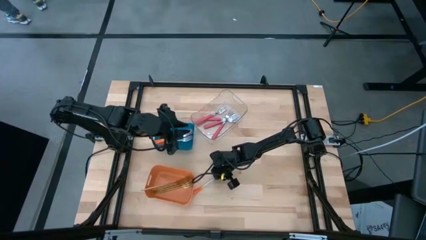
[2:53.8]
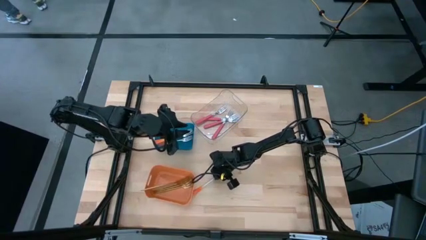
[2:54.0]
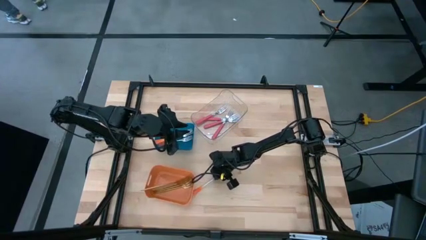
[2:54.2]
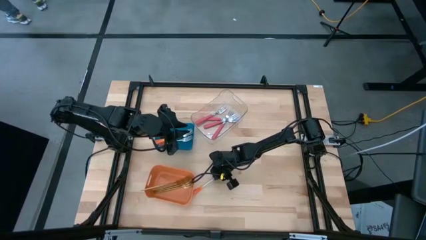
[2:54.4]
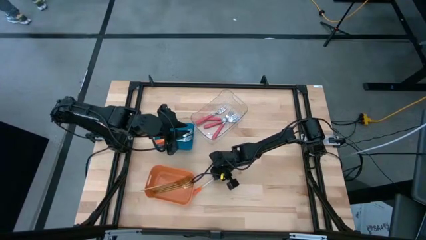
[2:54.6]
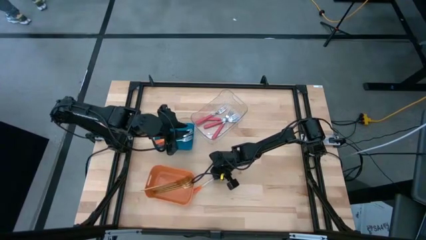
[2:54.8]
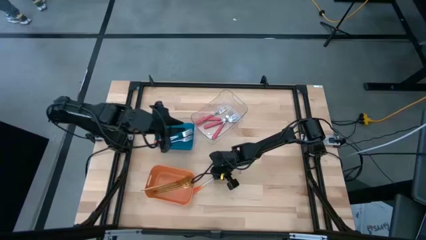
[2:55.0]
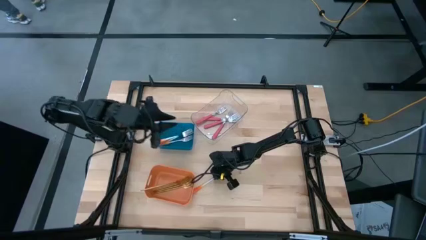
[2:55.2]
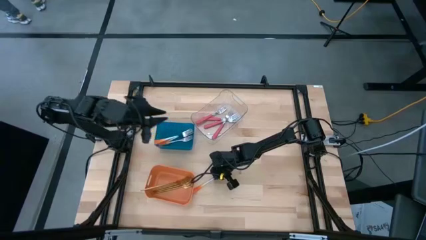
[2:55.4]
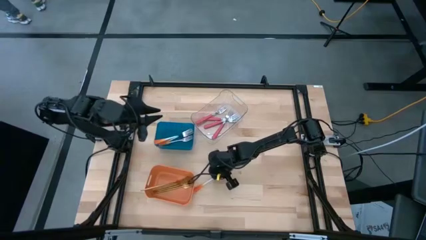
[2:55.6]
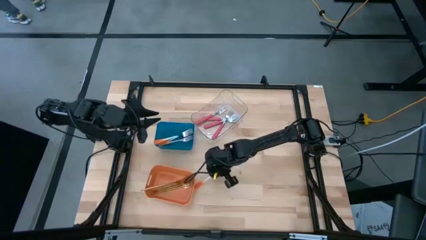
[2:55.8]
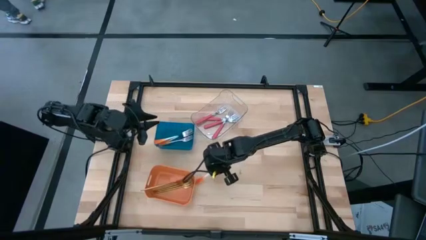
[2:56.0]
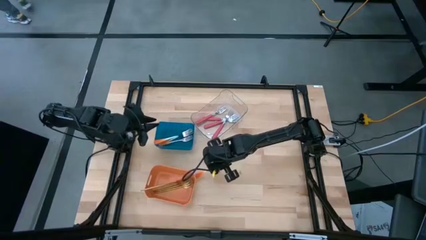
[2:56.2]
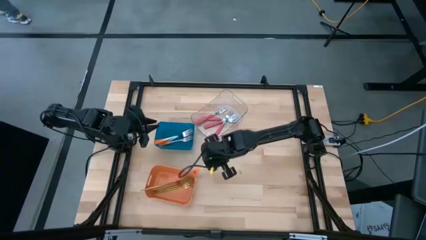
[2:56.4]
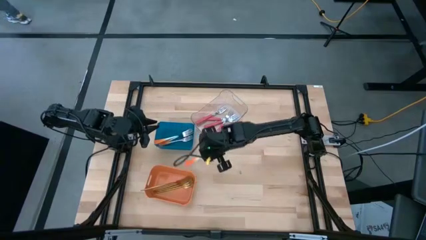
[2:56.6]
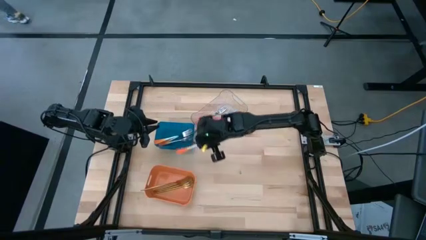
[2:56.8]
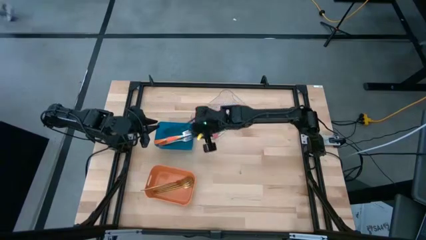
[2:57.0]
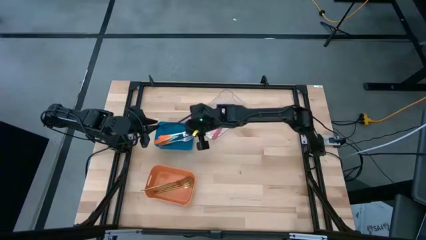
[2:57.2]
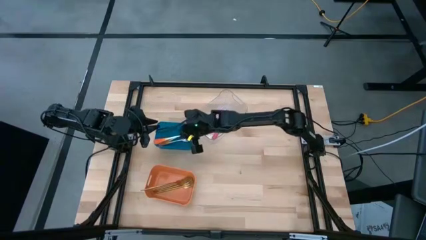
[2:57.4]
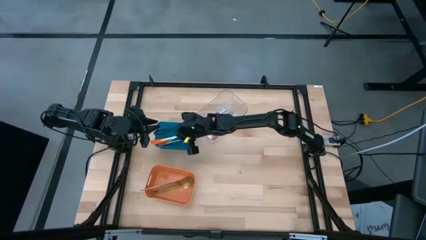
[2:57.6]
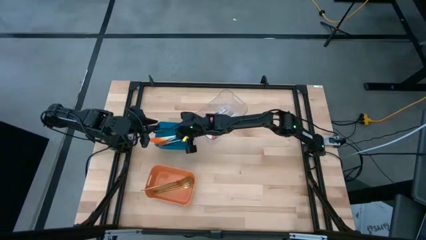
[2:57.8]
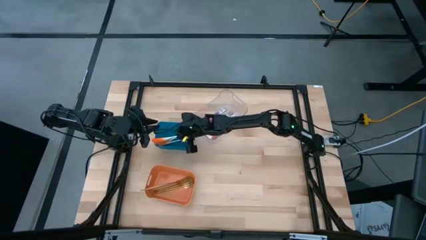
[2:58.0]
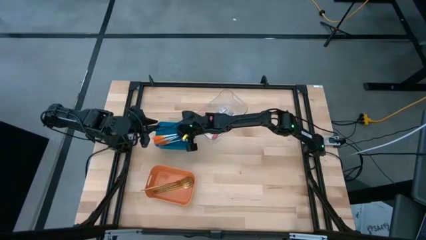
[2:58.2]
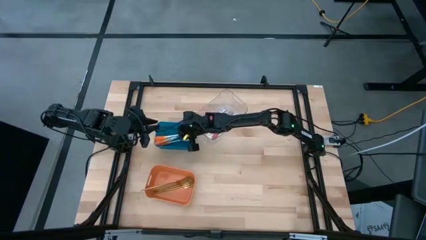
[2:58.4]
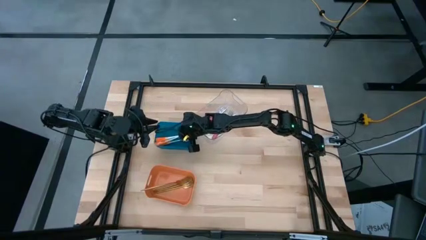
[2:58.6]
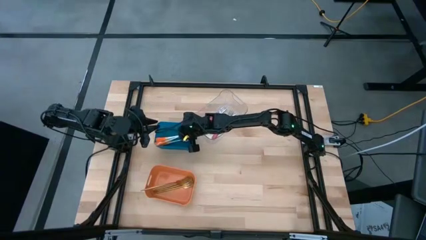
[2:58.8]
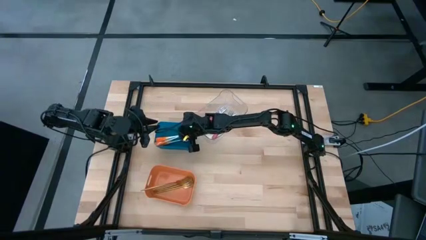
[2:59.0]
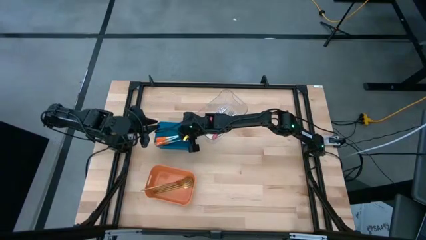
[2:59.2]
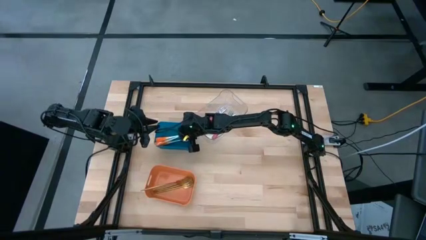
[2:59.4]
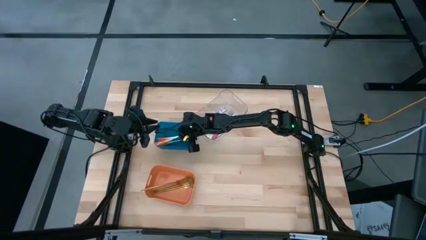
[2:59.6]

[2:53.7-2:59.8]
Task: Sort silverware by color (type)
Put the orange fork into the blue bin

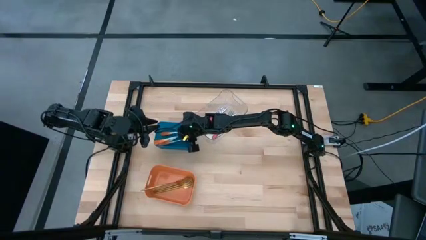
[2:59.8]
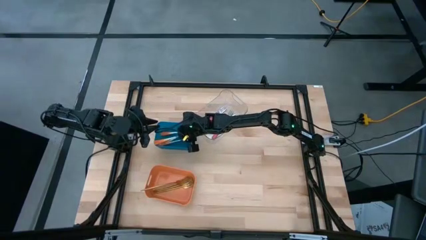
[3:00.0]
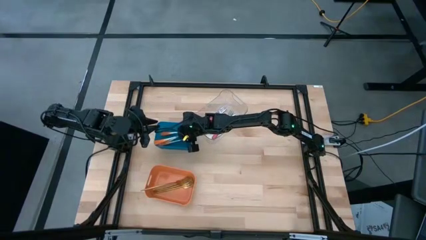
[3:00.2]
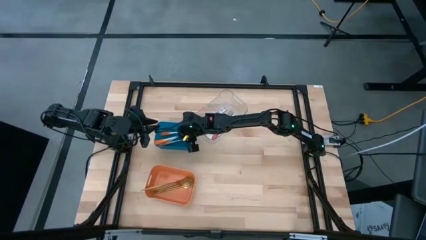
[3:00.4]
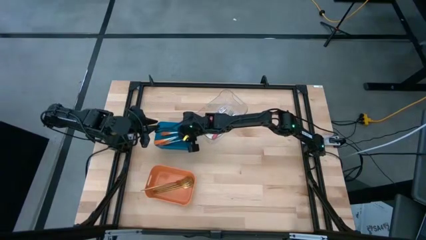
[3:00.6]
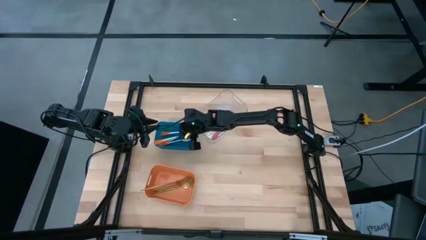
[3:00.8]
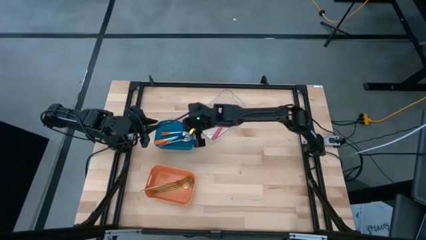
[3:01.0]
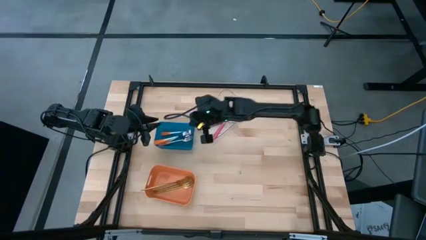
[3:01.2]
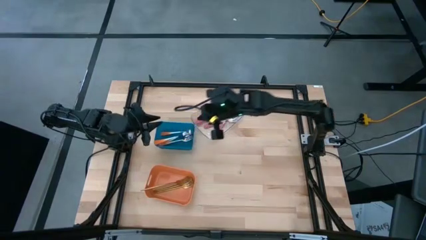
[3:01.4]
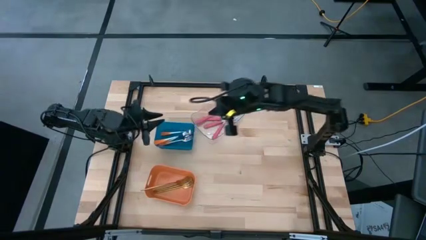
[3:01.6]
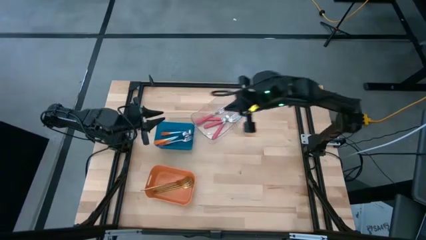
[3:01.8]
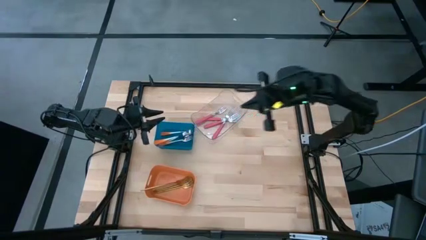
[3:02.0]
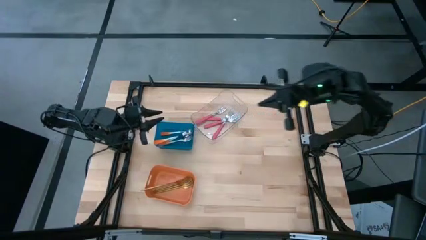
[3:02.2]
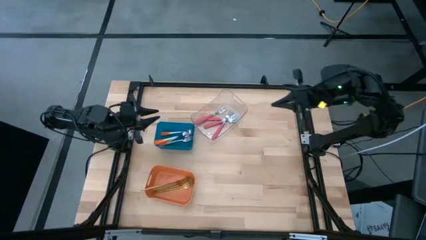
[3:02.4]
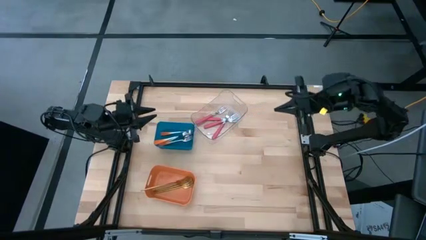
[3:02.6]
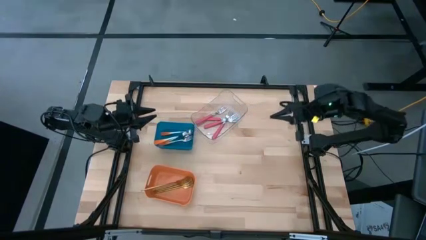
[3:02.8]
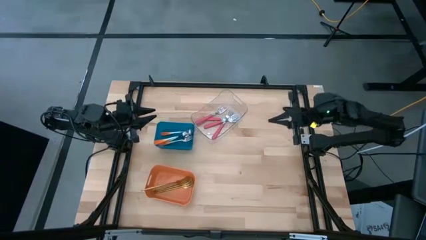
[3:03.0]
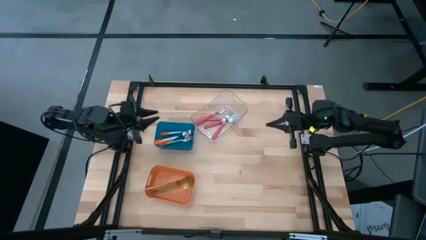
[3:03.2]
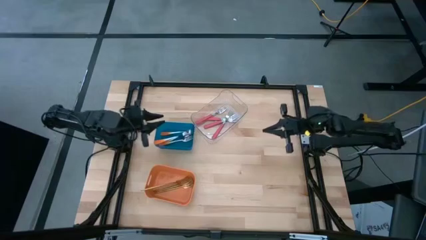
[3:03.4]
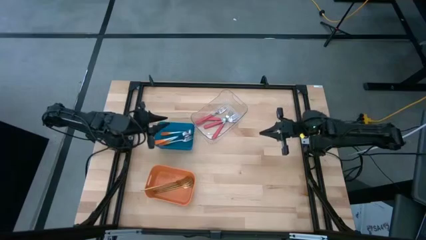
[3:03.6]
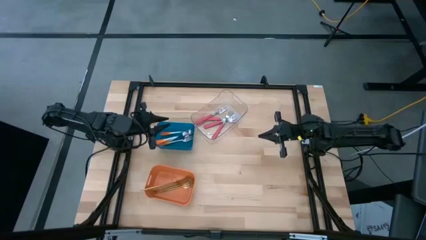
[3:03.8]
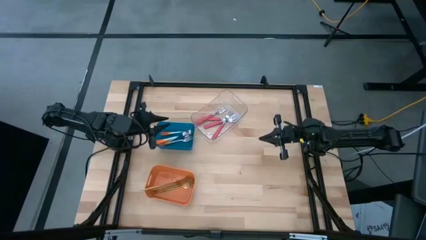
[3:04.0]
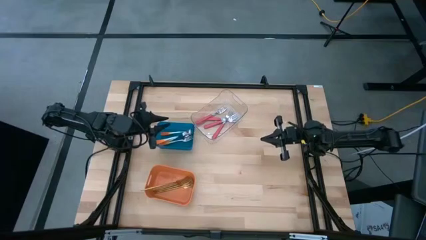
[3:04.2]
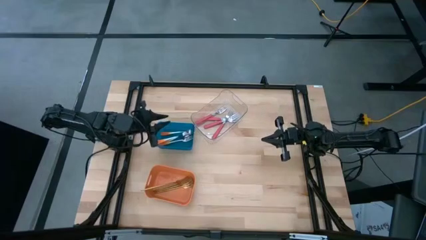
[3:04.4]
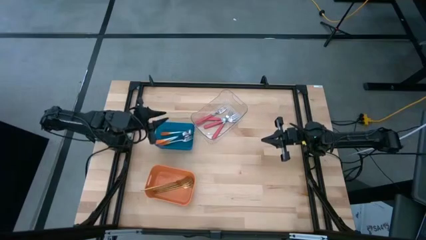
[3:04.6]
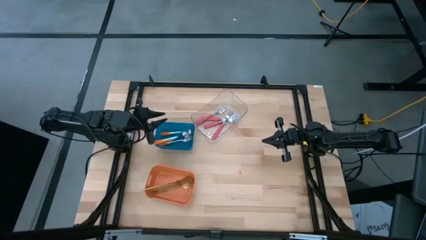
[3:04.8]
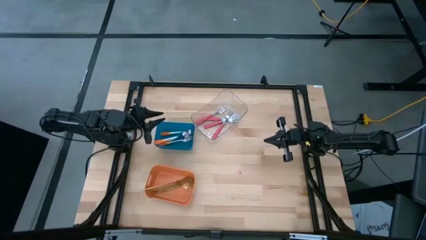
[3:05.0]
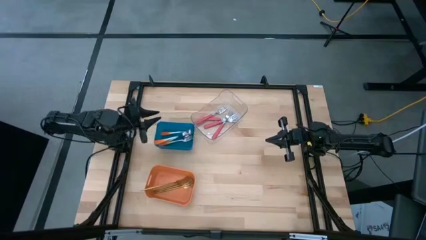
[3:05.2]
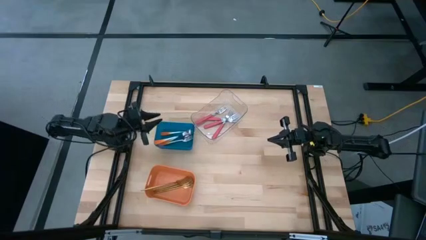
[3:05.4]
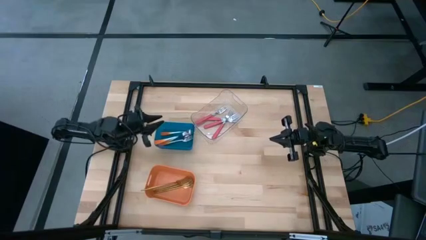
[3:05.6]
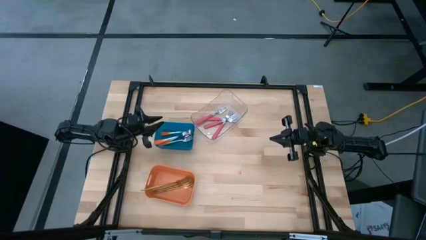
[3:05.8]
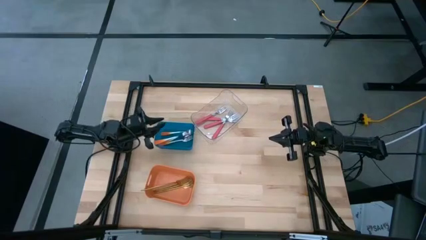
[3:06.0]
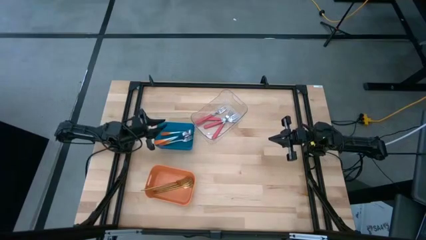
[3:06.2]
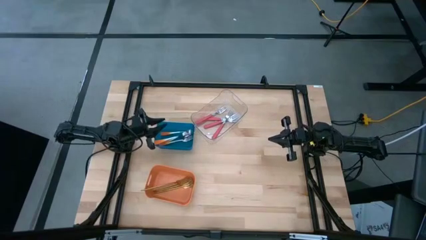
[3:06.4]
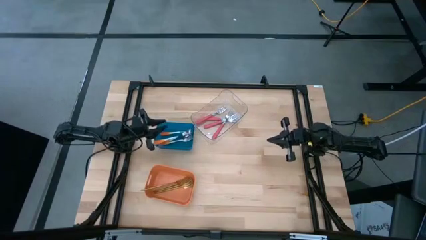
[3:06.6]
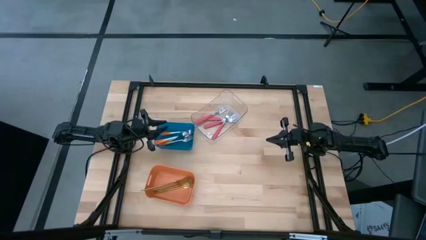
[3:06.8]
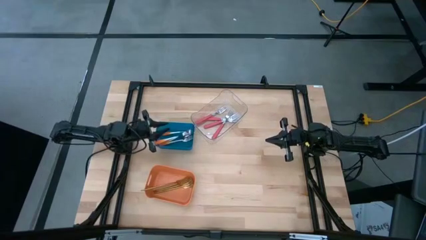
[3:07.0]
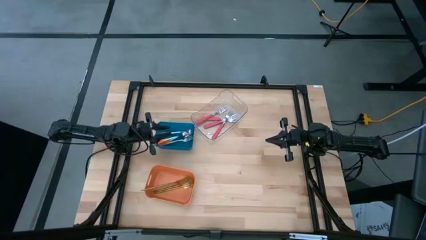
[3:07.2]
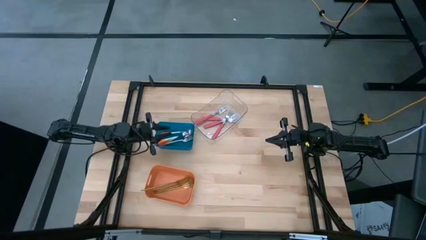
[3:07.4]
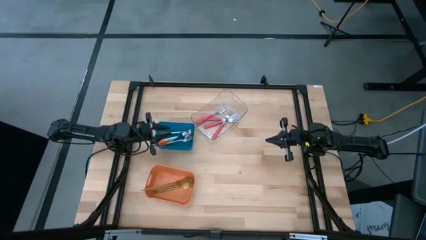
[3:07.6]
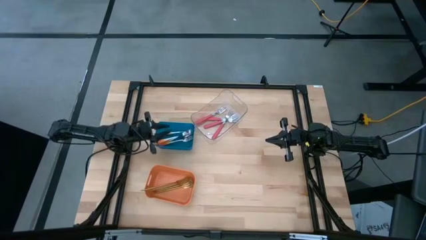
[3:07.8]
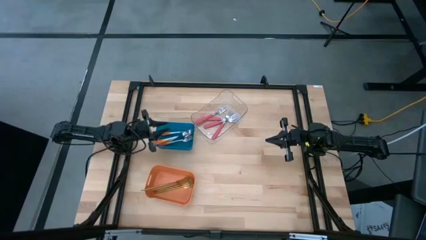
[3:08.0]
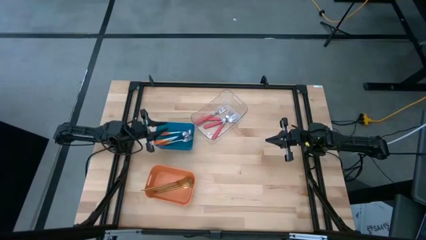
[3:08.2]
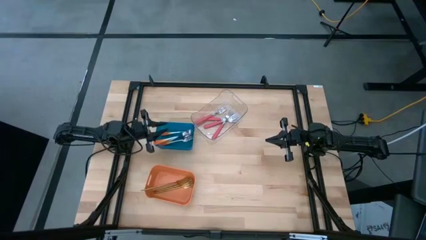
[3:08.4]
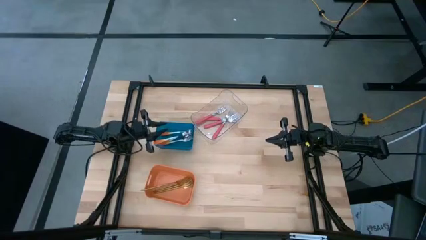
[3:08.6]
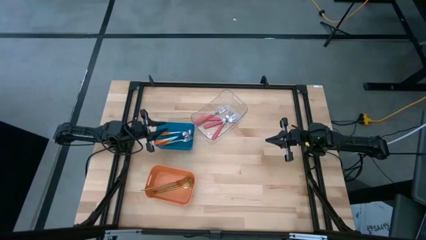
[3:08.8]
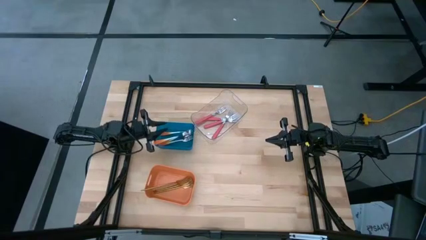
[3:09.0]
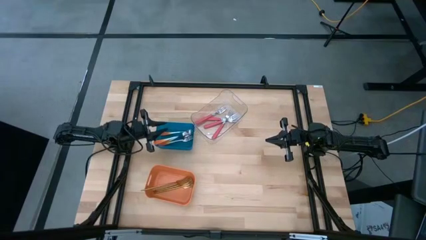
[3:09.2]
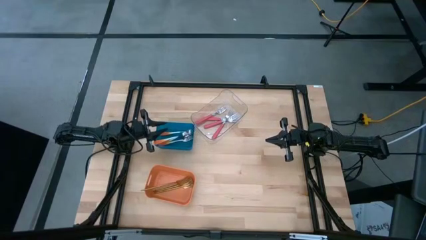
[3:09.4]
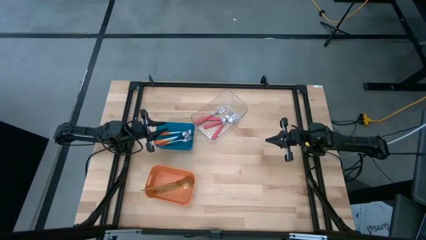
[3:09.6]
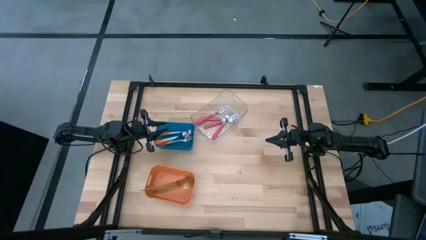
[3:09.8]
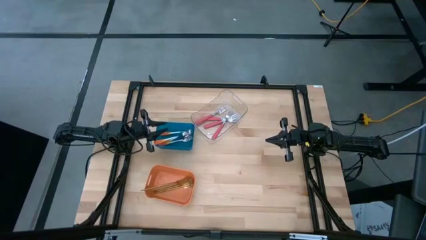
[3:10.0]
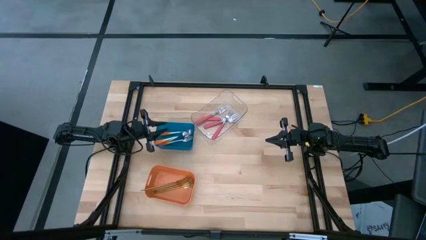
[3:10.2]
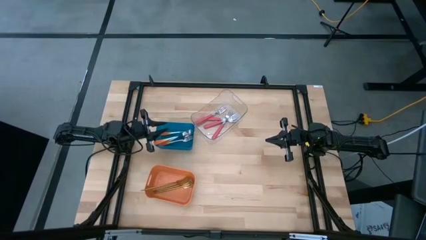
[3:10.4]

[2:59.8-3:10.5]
Return to Home Position
